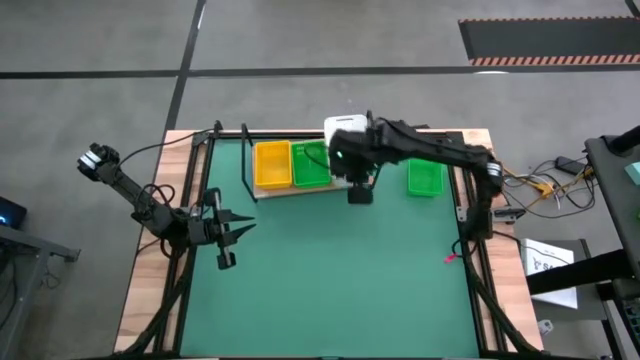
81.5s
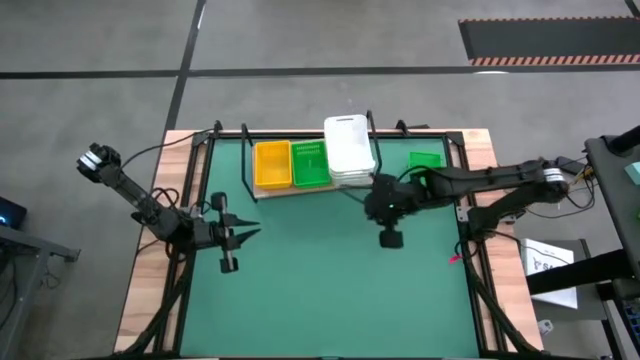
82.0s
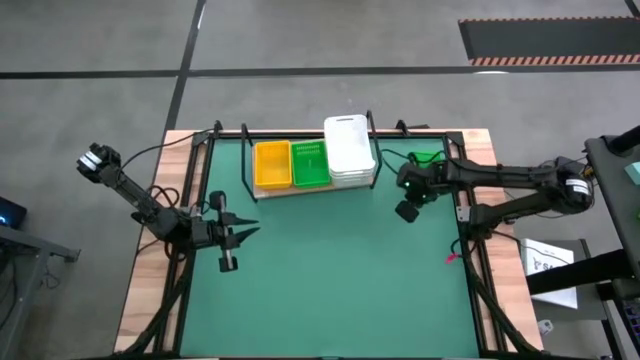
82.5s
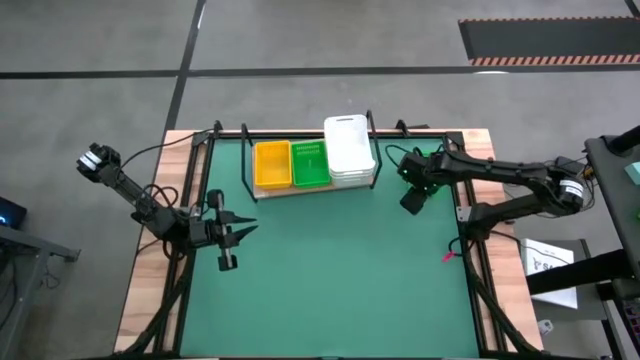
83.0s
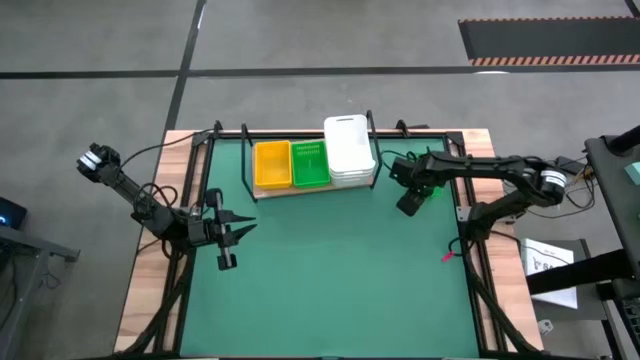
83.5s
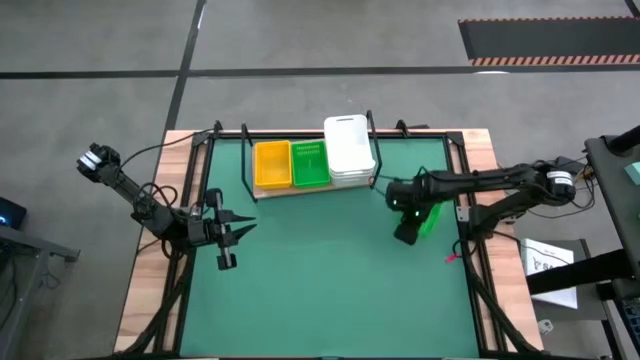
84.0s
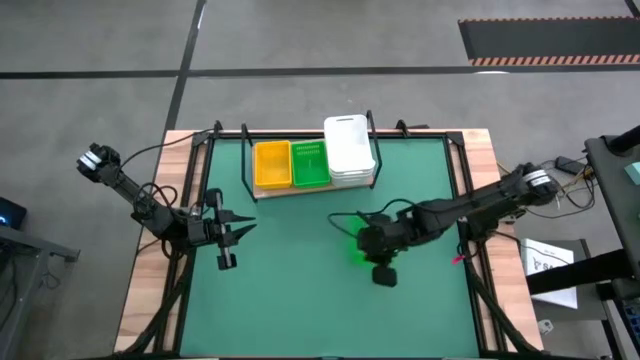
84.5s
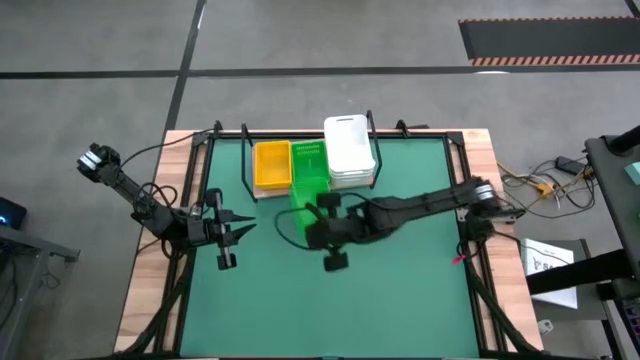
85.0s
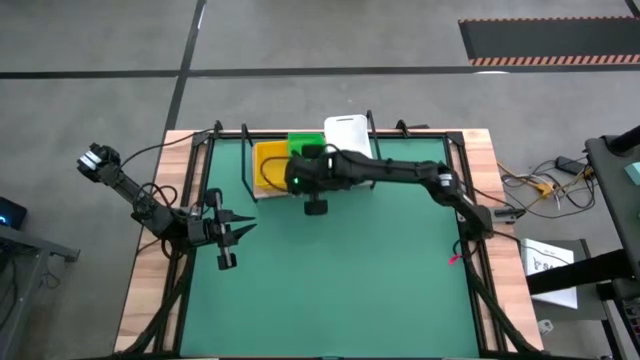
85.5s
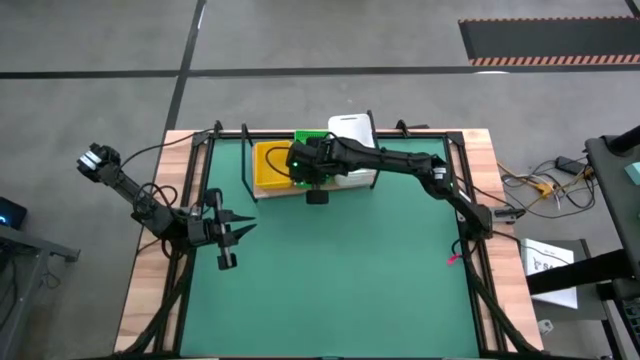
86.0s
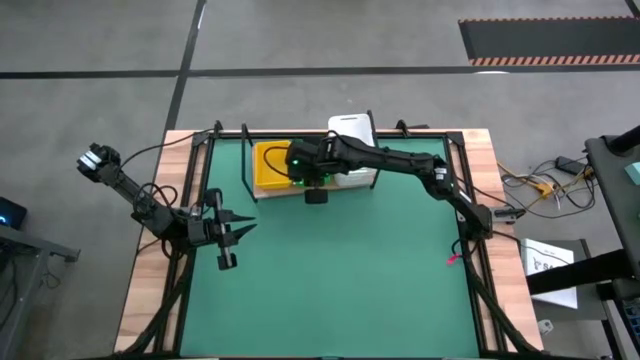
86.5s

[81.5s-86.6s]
Task: Stack baskets on shelf by color
Stack the green bin on the green bin on the shelf

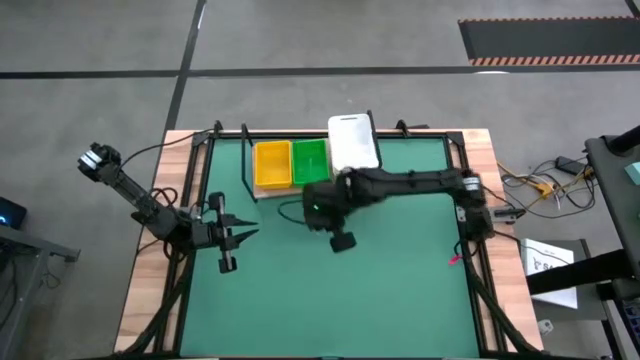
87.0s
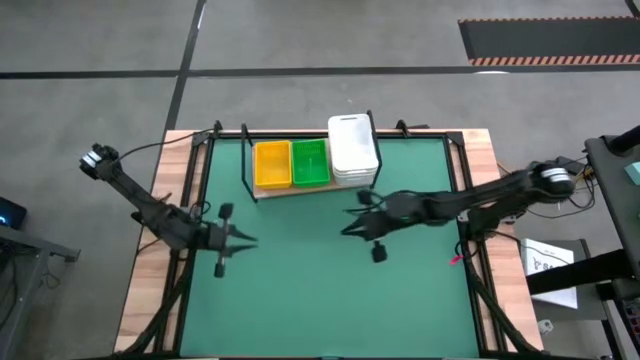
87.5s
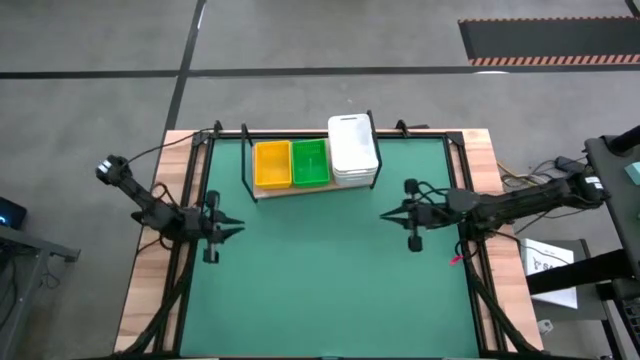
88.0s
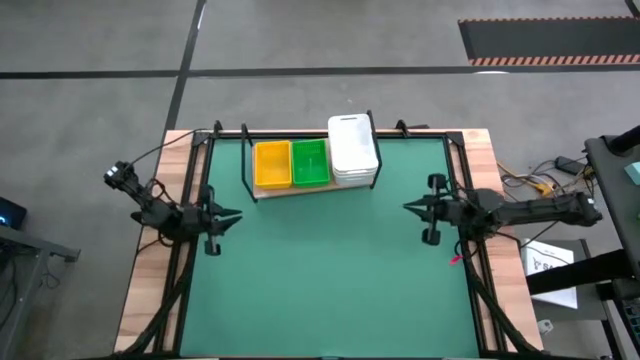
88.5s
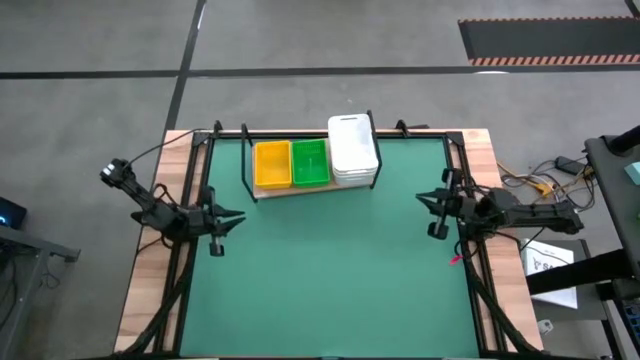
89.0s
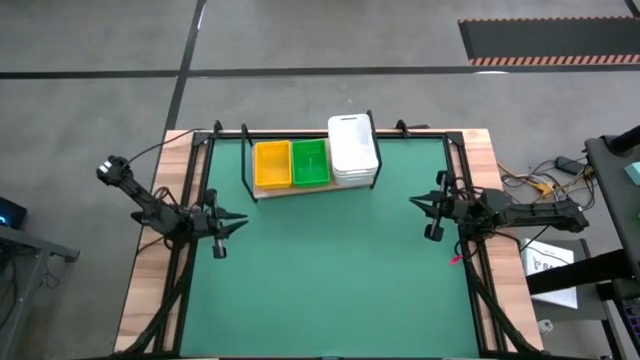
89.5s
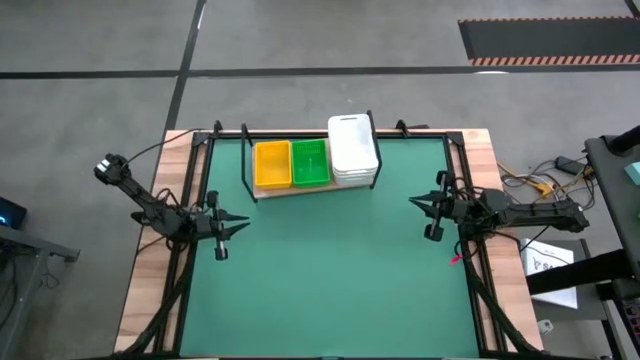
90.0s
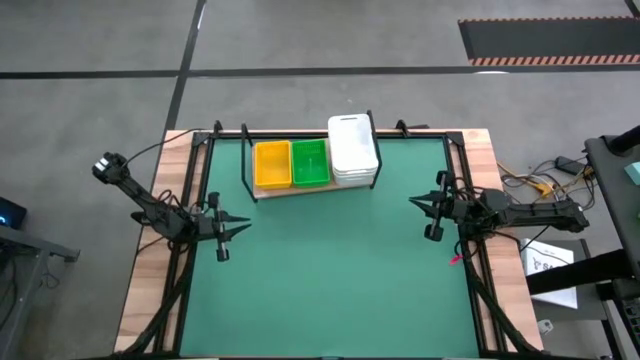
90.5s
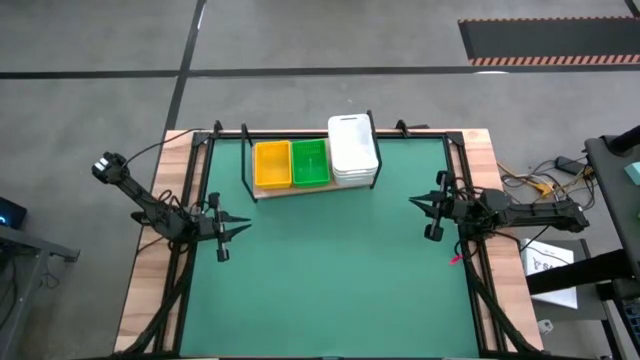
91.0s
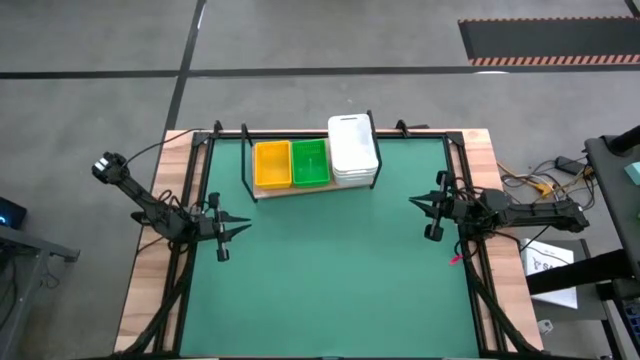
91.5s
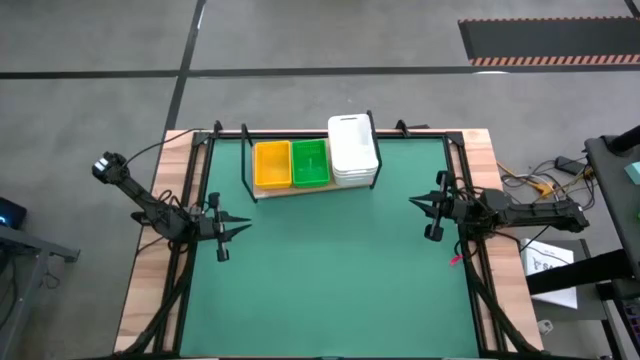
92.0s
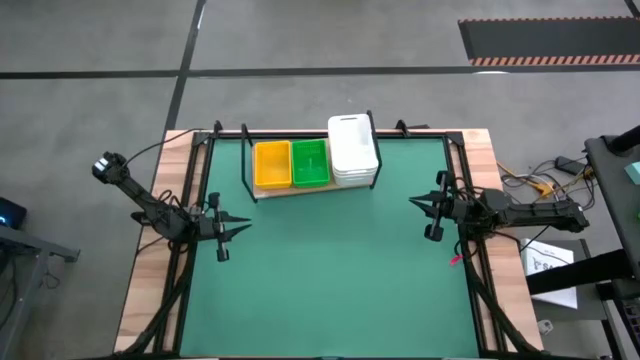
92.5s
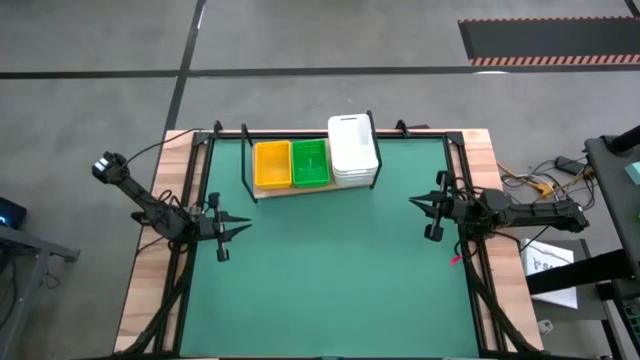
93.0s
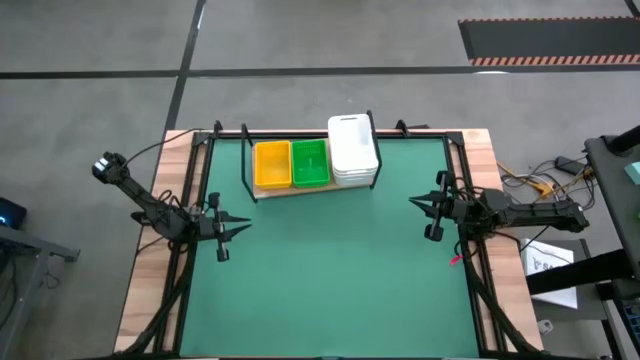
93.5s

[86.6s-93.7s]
Return to Home Position

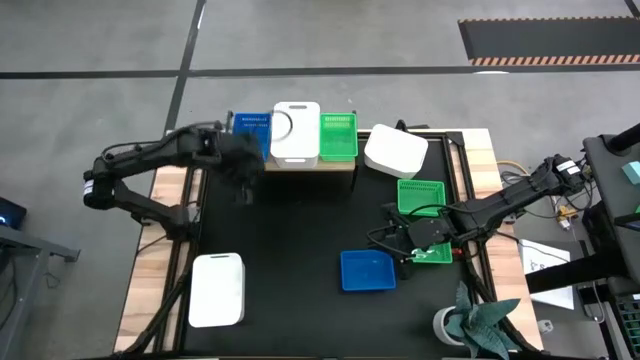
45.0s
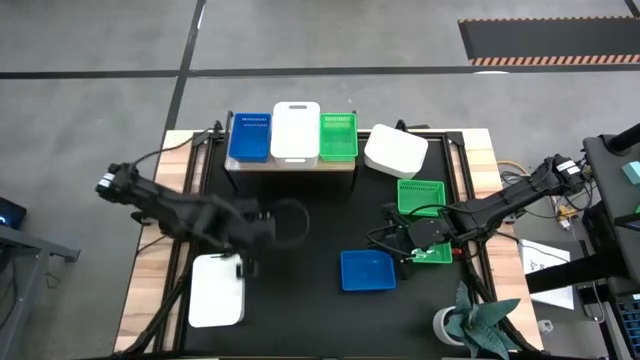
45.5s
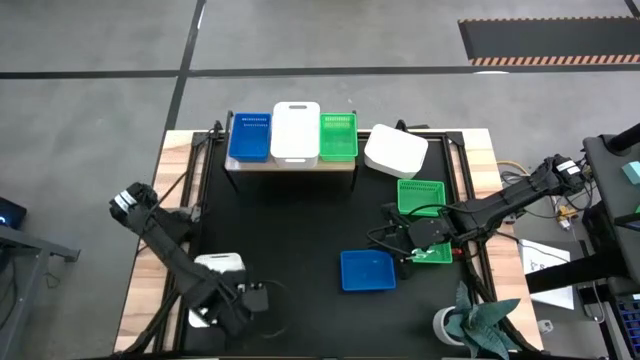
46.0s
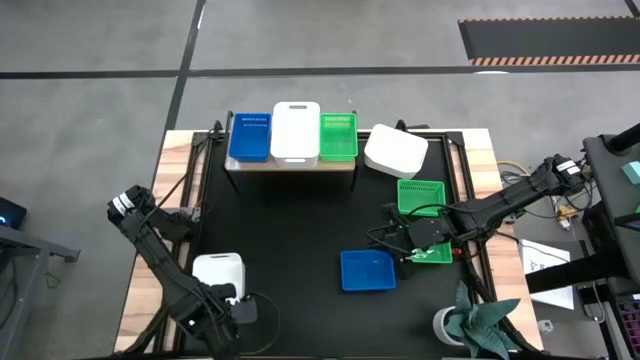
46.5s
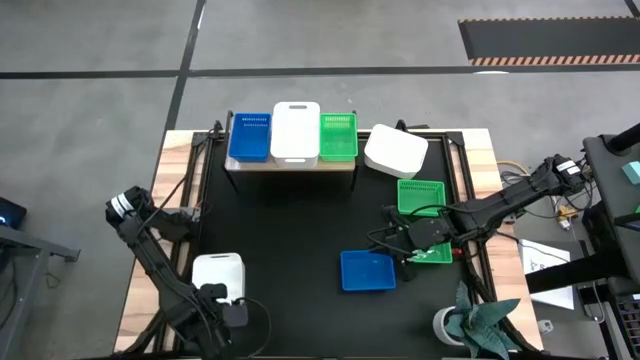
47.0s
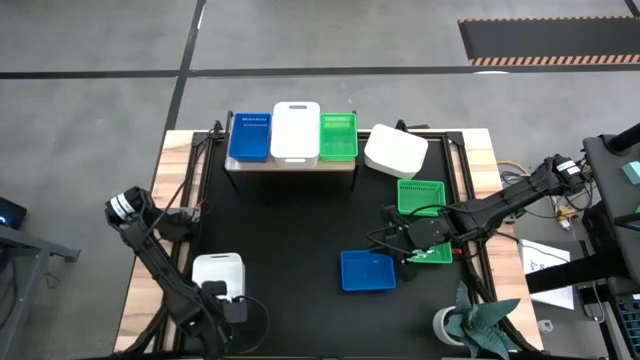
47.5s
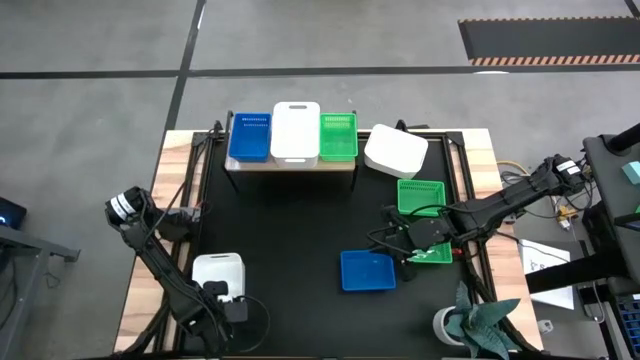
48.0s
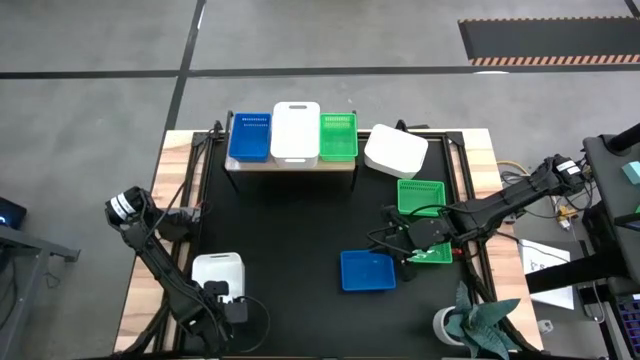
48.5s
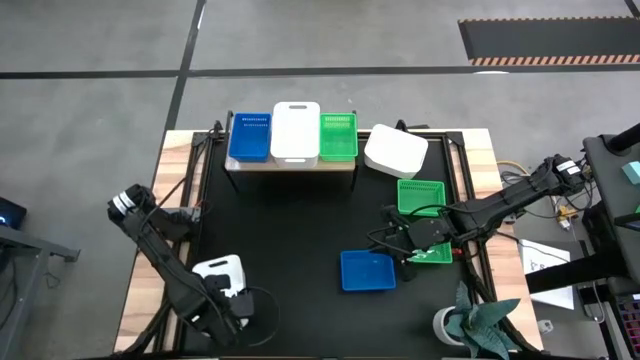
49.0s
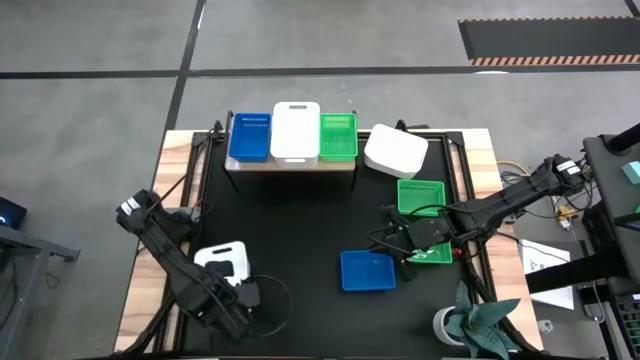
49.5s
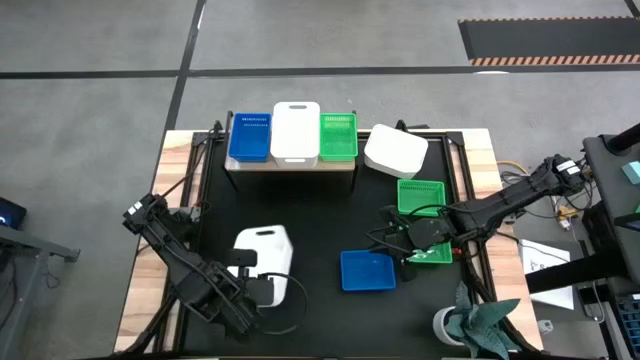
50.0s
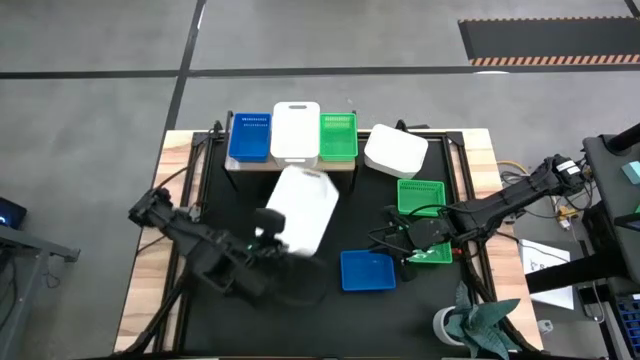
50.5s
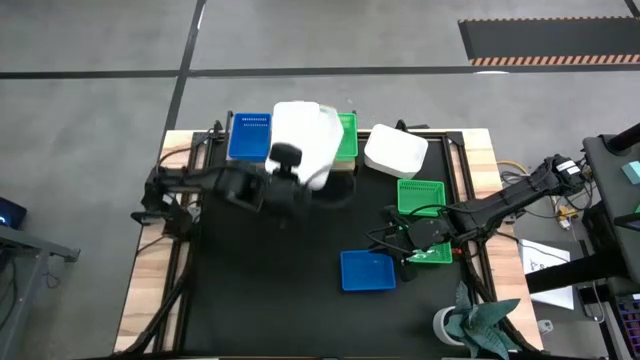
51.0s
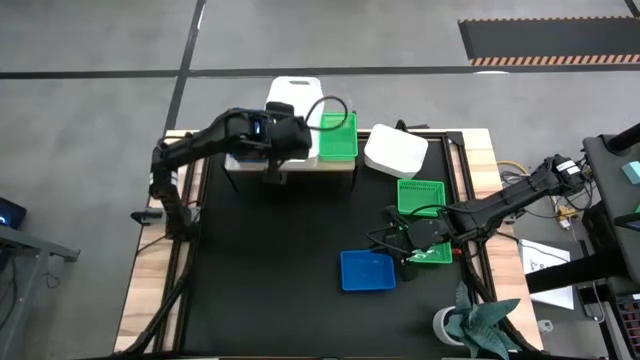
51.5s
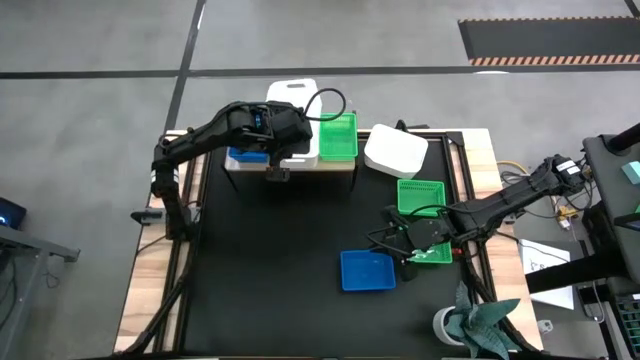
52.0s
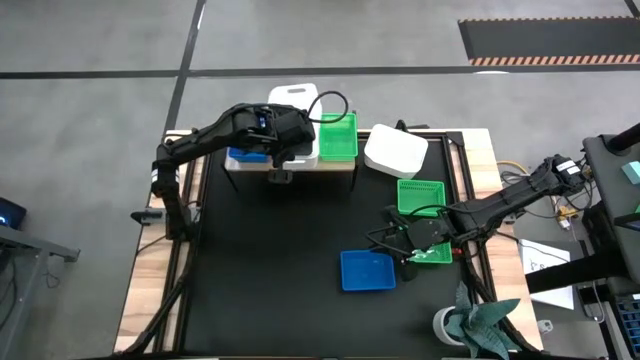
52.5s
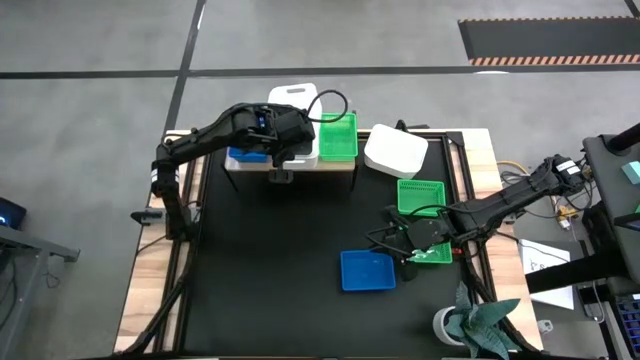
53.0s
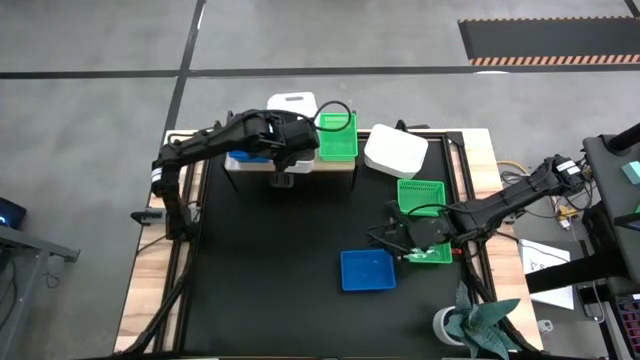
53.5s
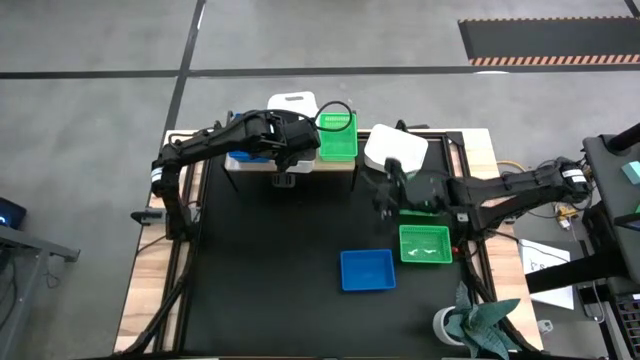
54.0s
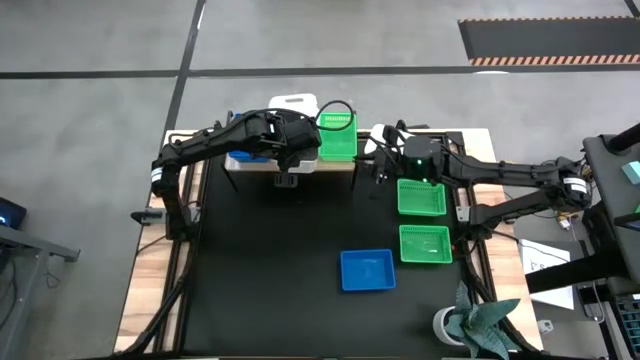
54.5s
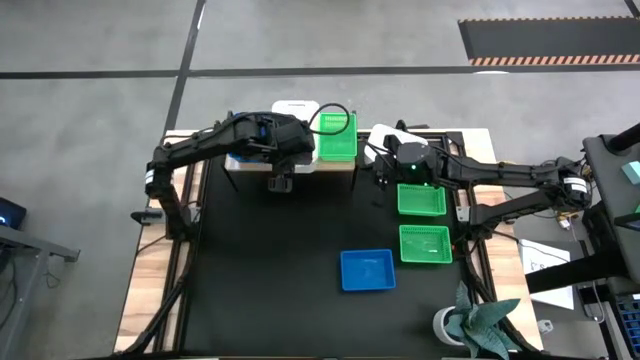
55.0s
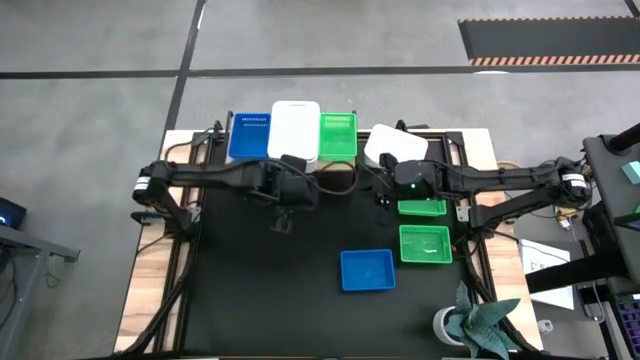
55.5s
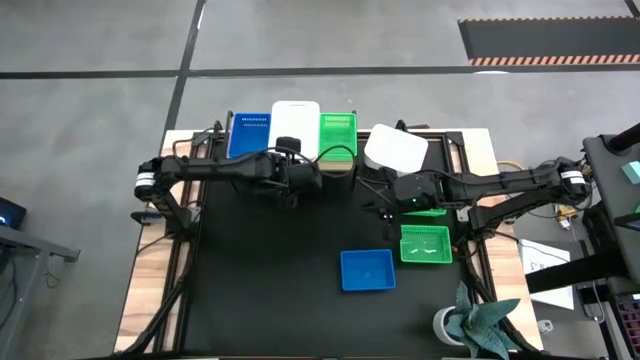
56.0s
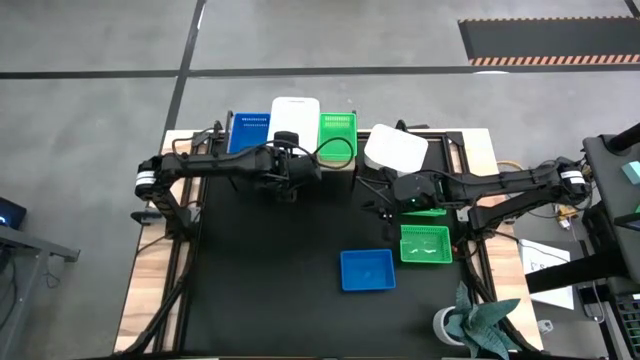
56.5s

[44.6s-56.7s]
Task: Stack baskets on shelf by color
Stack the bottom white bin on top of the white bin on the shelf
